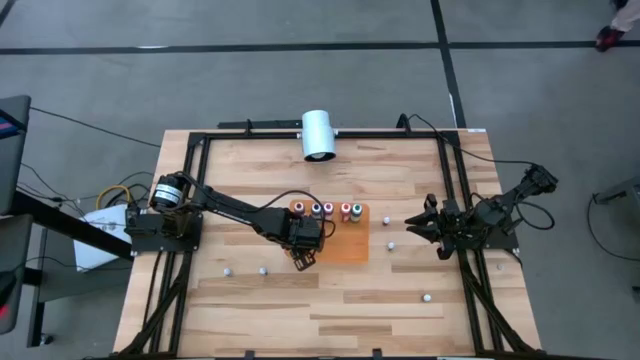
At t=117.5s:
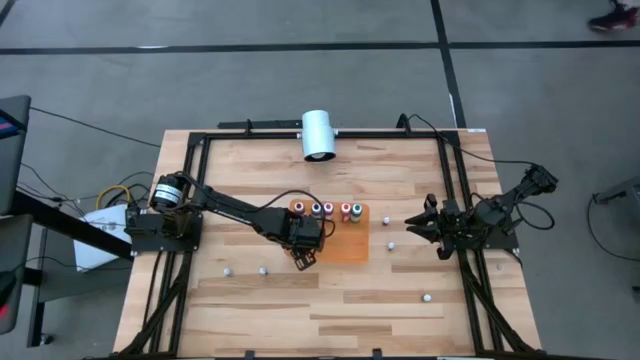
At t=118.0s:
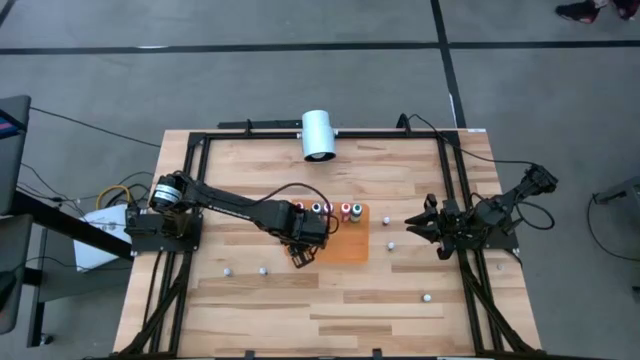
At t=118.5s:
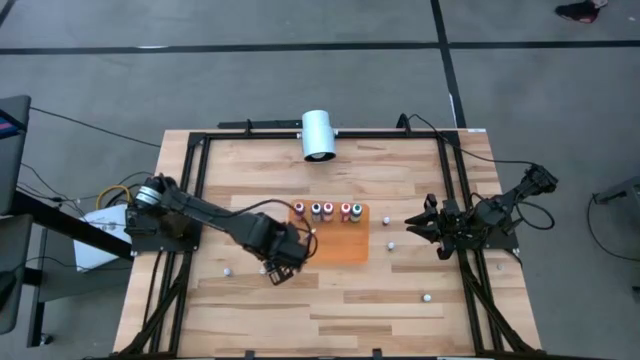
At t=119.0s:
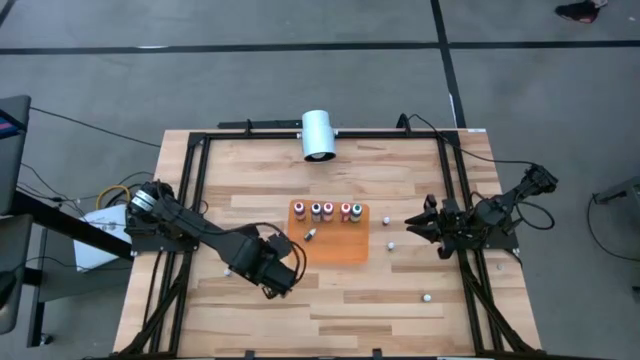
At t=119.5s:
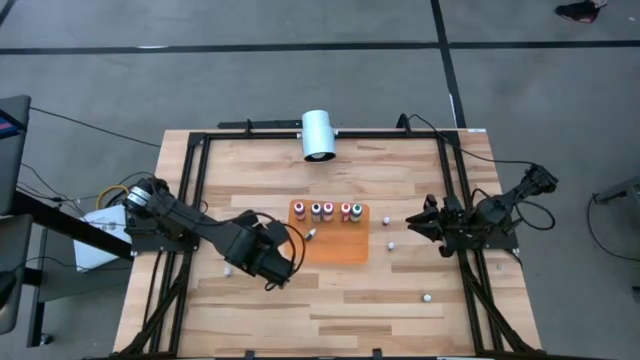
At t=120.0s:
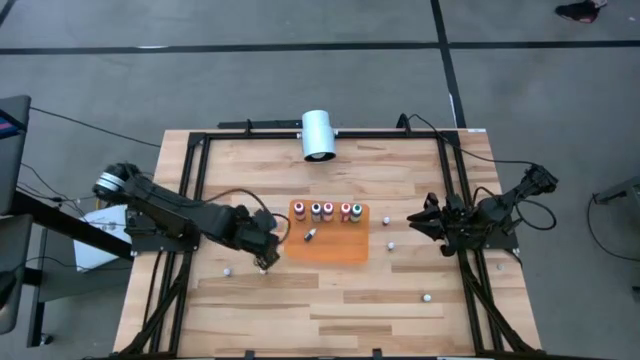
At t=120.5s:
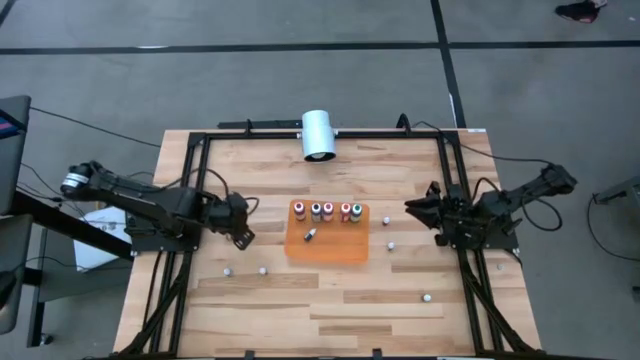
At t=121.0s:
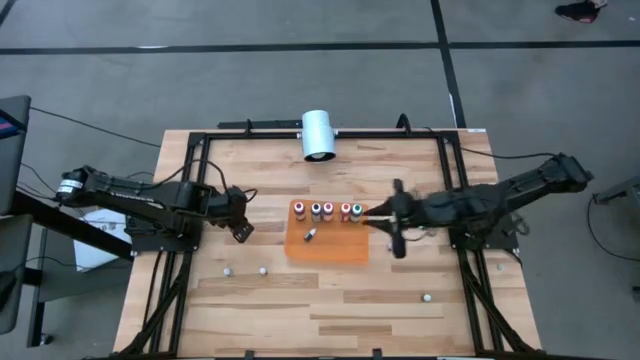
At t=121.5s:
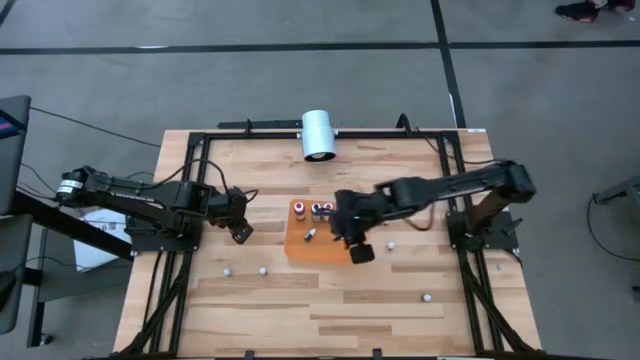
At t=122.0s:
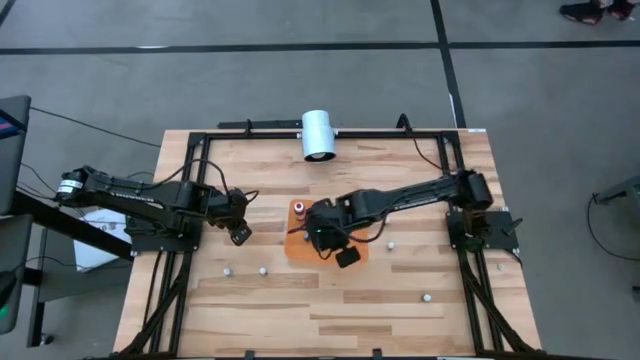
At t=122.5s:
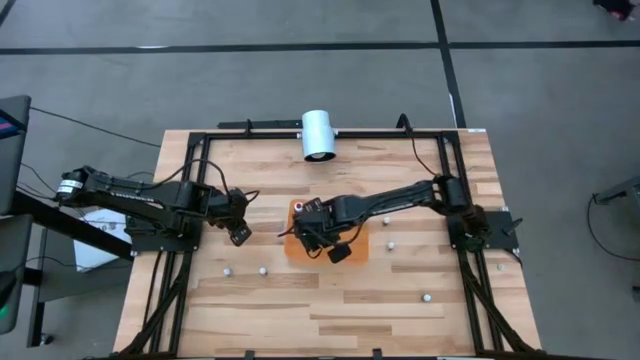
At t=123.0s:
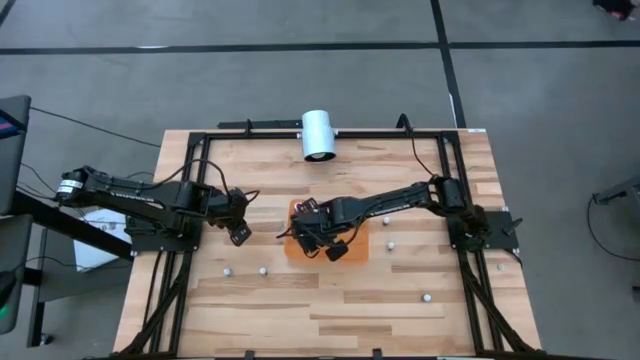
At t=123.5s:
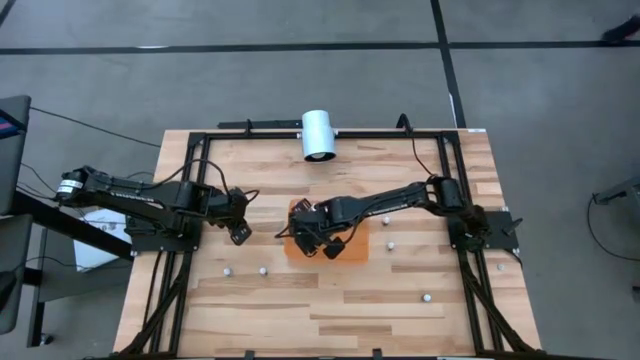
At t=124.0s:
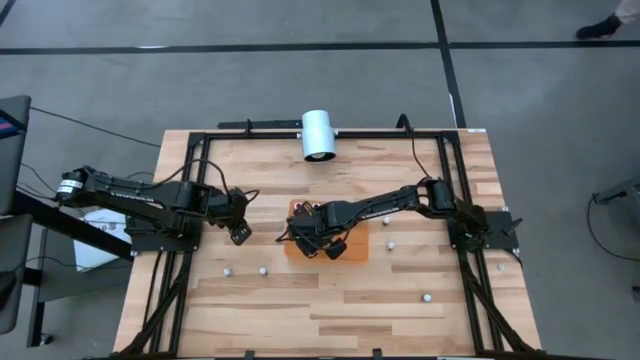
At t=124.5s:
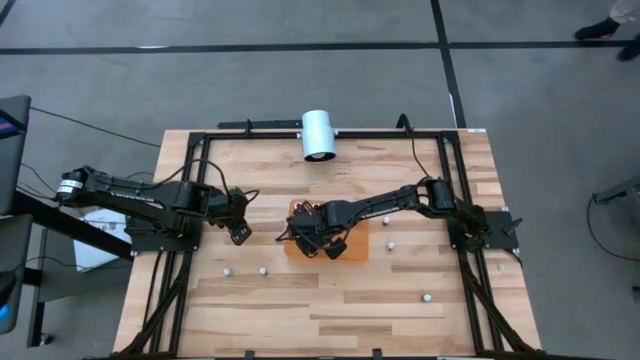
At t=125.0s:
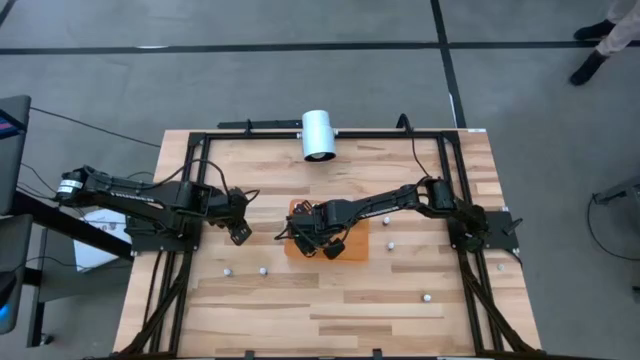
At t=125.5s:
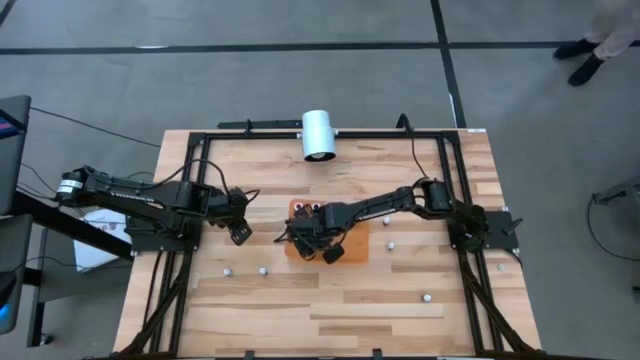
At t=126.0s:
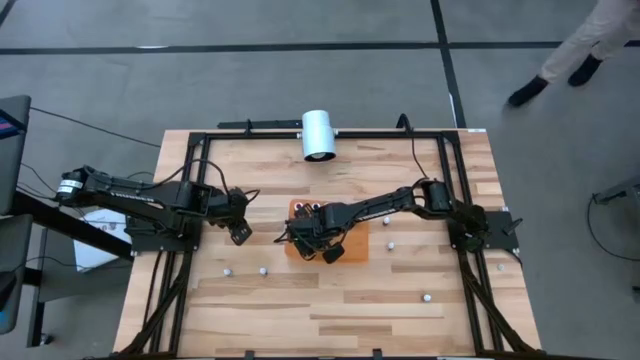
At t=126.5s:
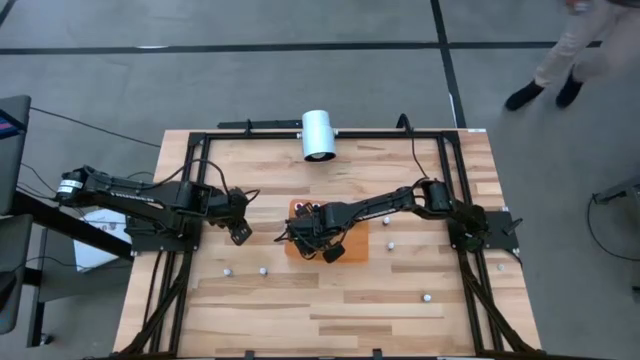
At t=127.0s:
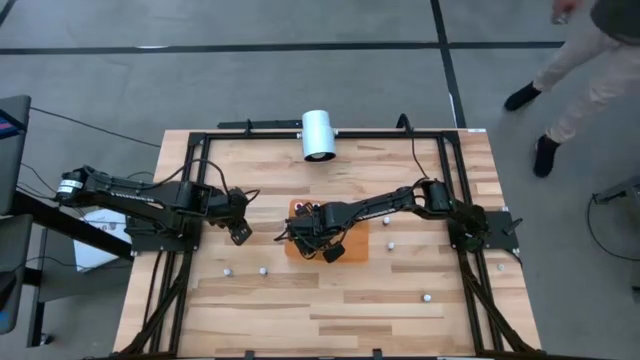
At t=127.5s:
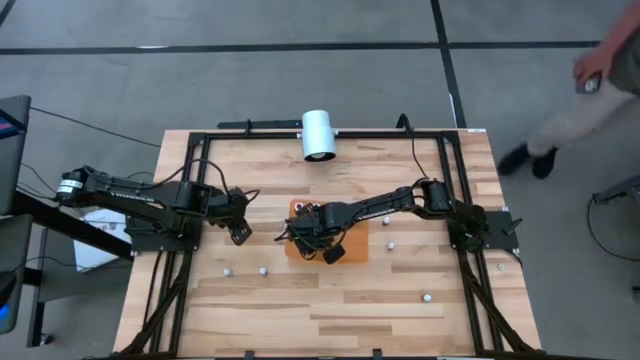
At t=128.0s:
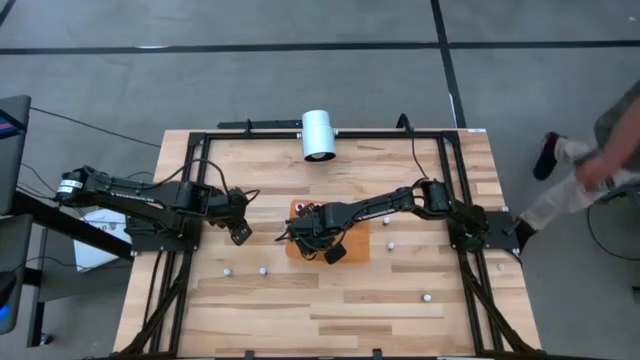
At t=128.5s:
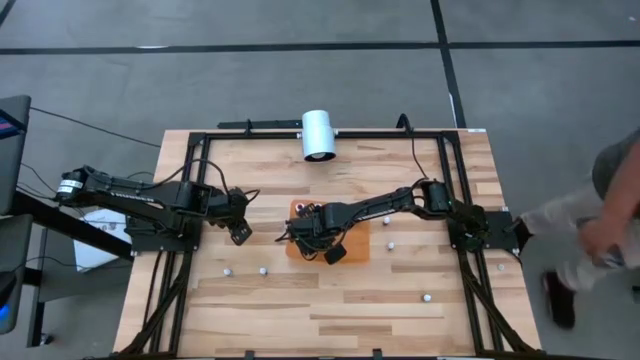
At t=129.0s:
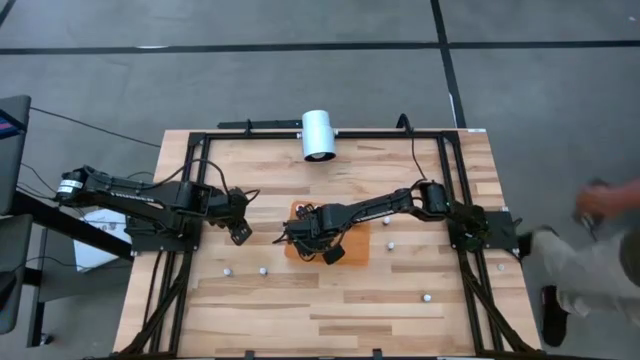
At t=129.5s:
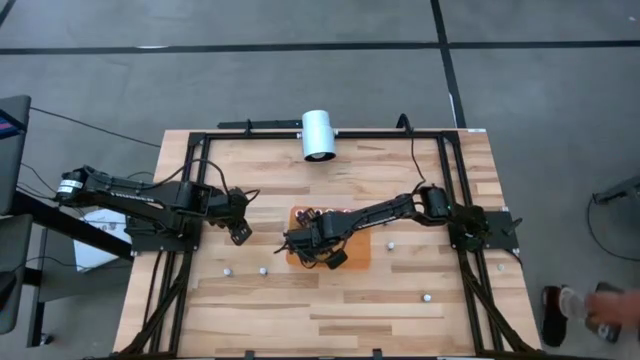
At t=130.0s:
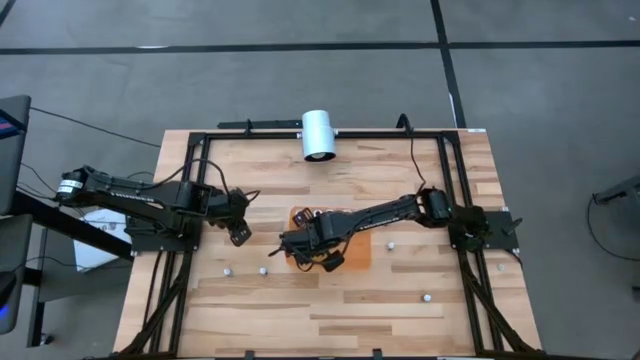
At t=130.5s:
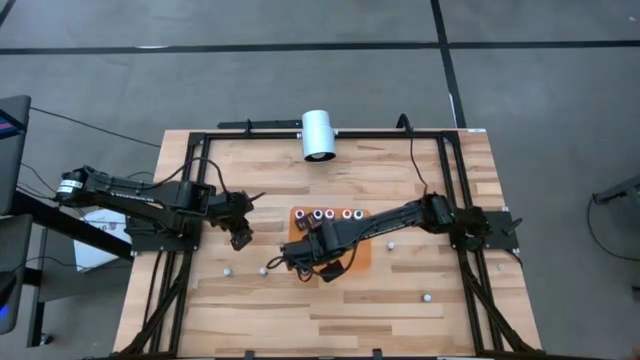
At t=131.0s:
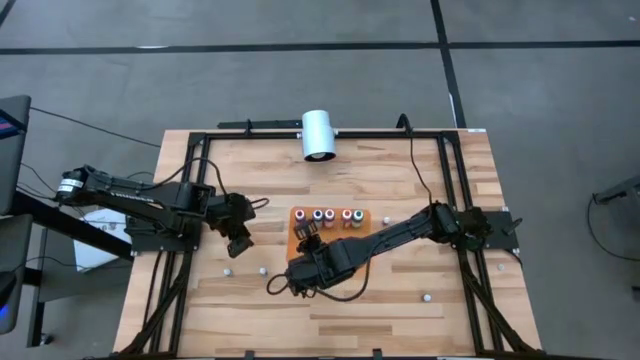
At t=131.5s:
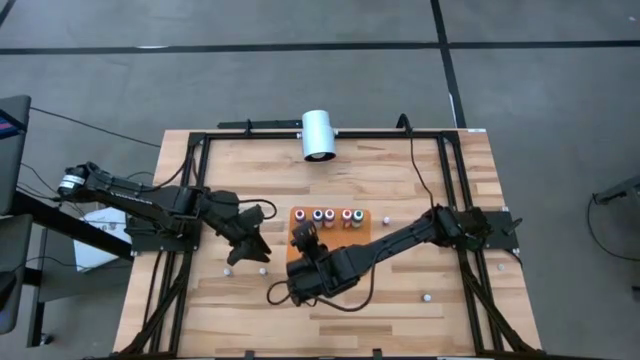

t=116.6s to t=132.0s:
Task: Pick & Place food coloring
Put the small black food coloring into the orange bin

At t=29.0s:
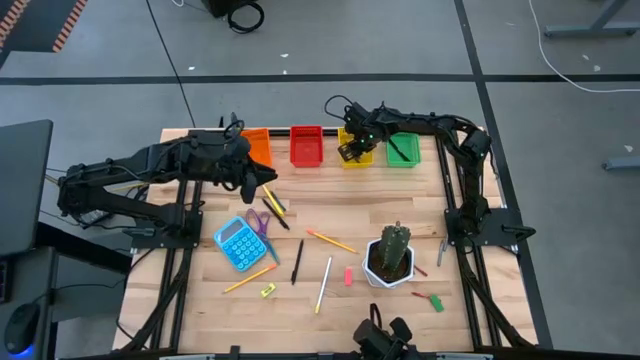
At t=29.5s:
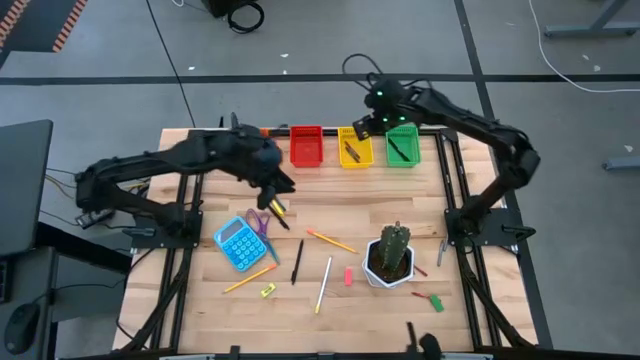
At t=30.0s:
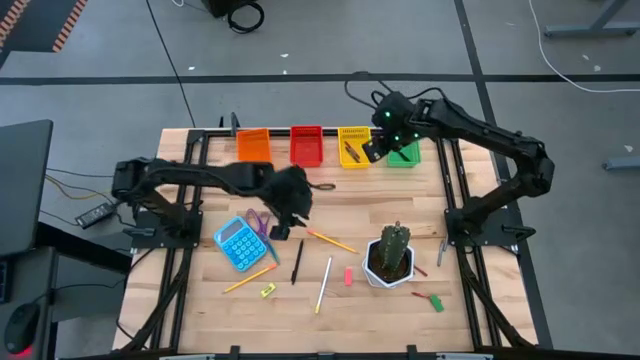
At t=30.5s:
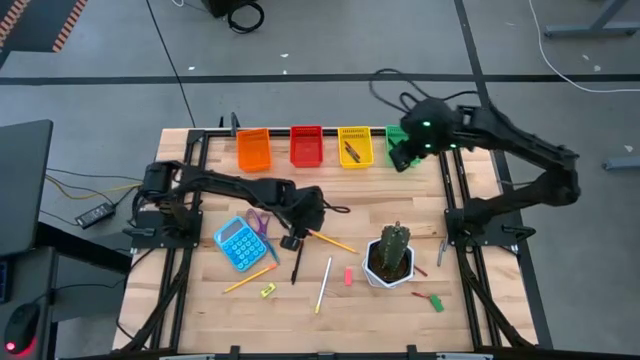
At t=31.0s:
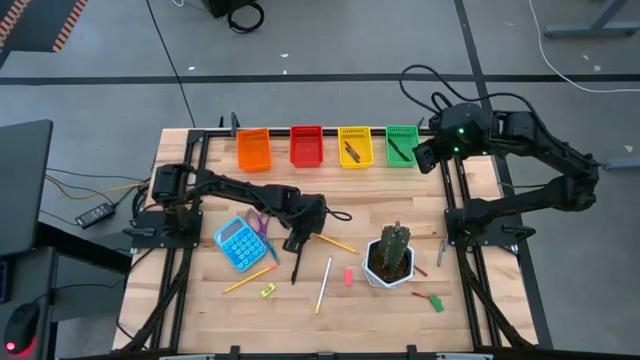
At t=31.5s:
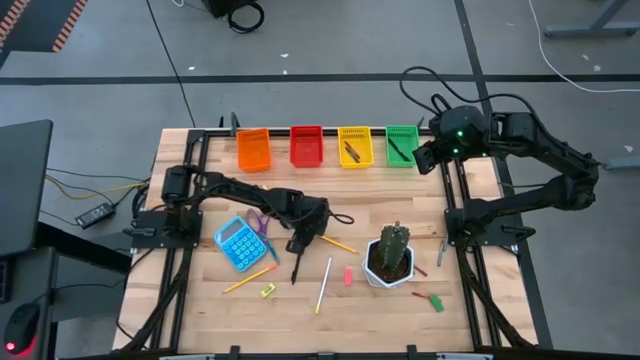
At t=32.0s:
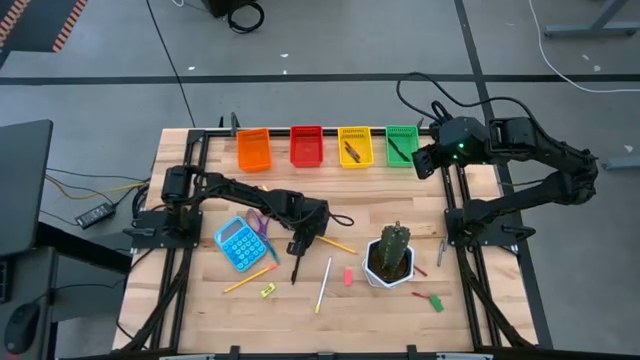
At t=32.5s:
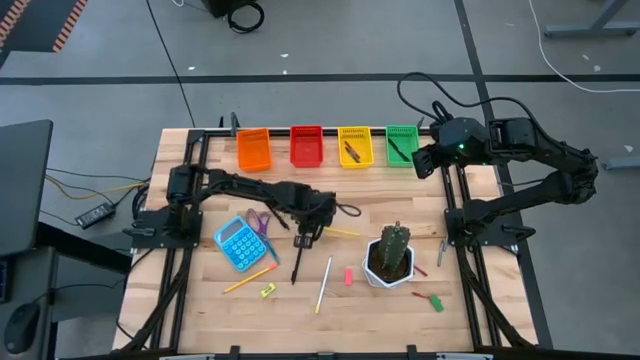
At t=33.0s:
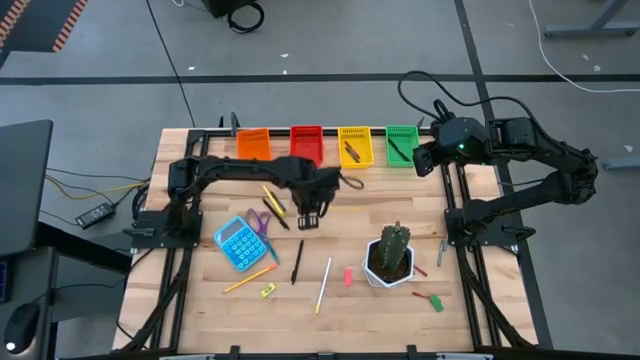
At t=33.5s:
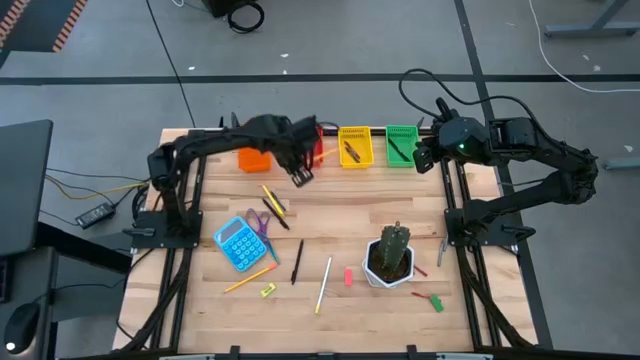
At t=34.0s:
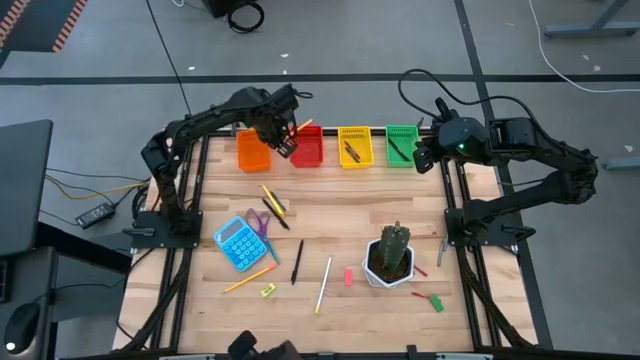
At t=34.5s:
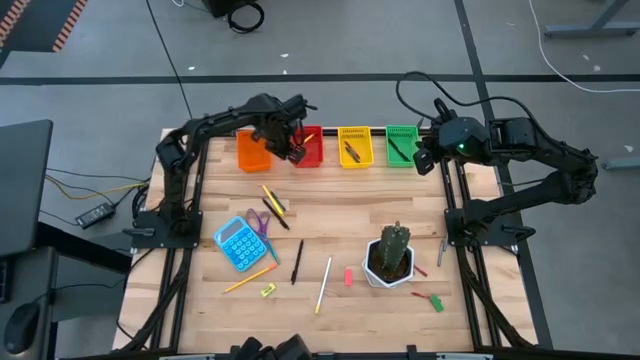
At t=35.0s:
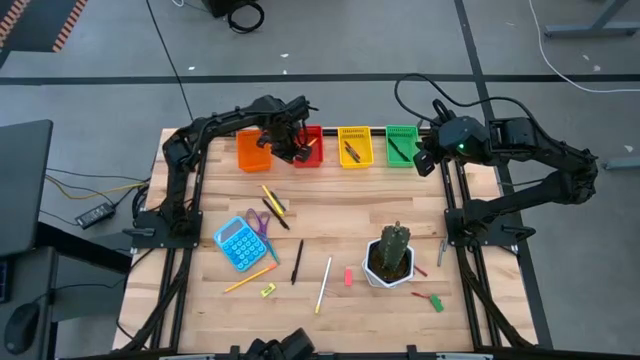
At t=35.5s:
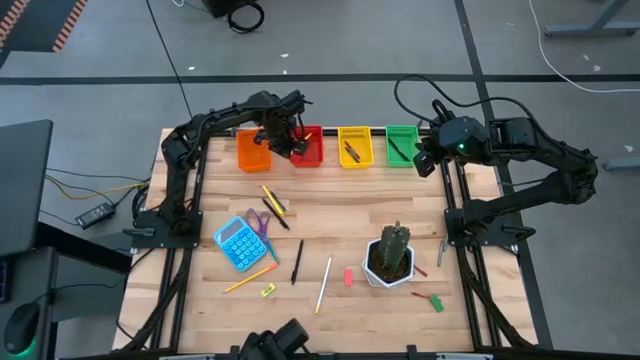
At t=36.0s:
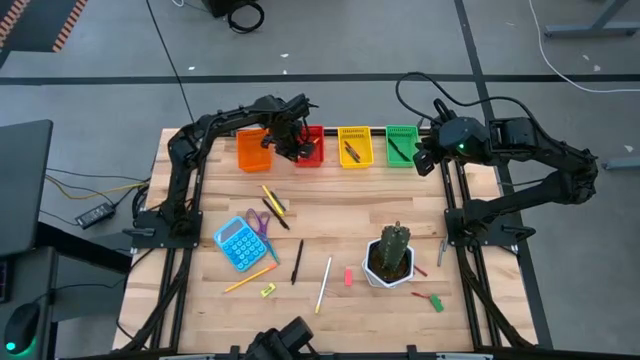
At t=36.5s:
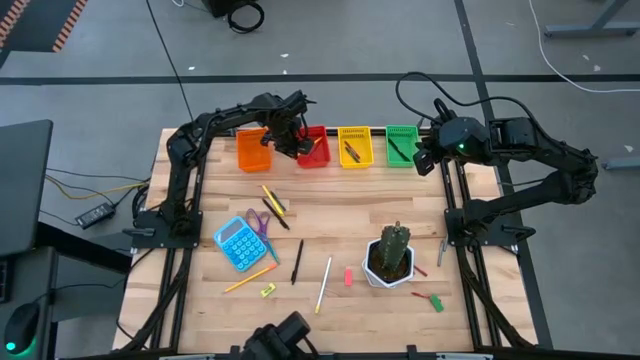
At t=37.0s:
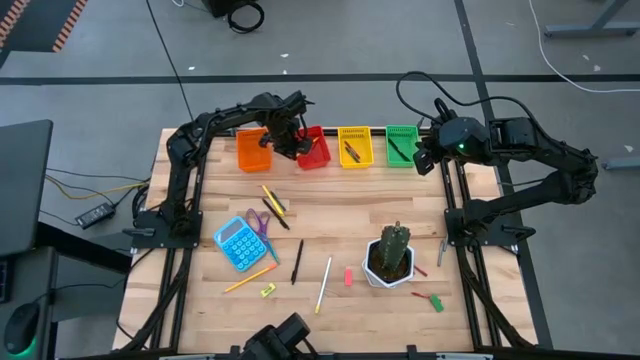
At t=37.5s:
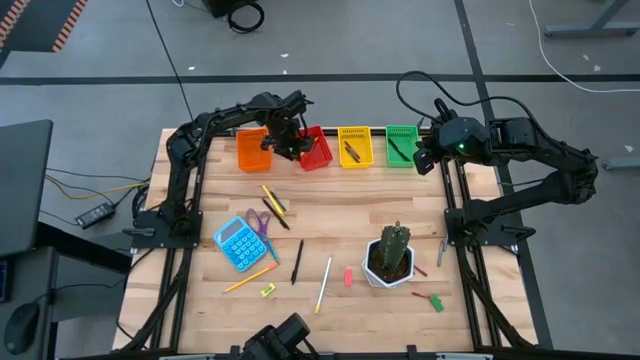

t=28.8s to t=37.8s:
Task: Sort crayons/erasers/pens/pencils in bins
Put the top yellow pencil into the red bin
